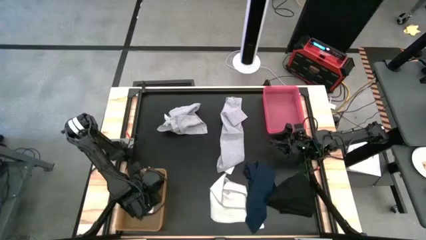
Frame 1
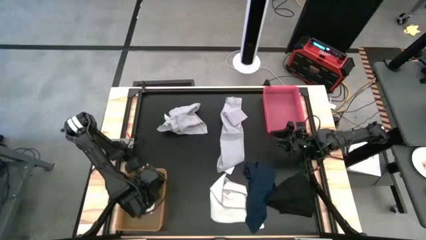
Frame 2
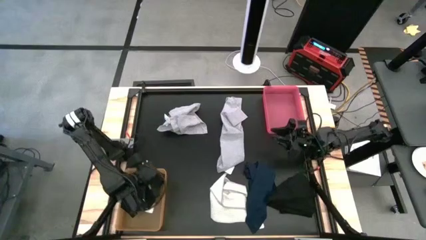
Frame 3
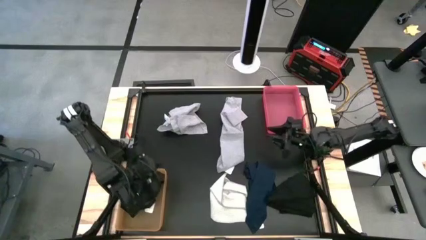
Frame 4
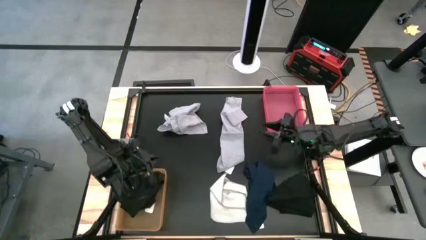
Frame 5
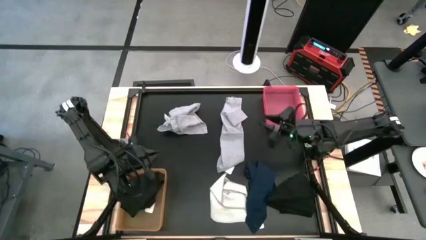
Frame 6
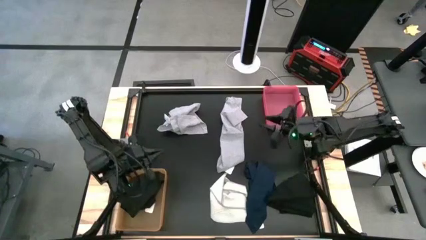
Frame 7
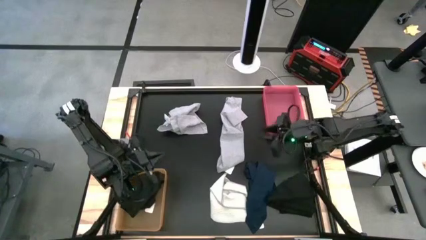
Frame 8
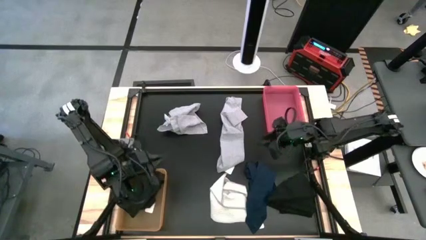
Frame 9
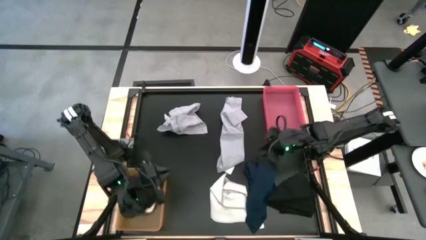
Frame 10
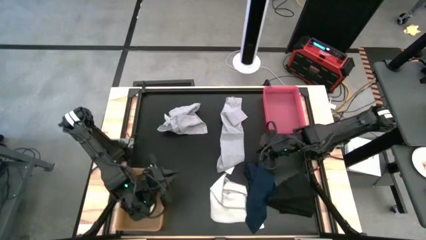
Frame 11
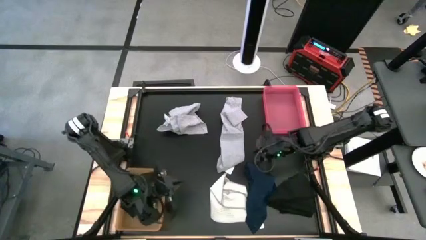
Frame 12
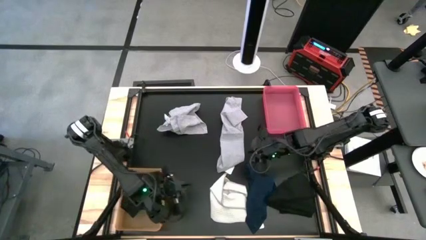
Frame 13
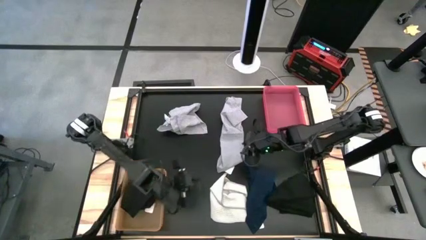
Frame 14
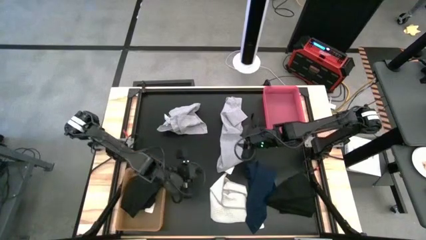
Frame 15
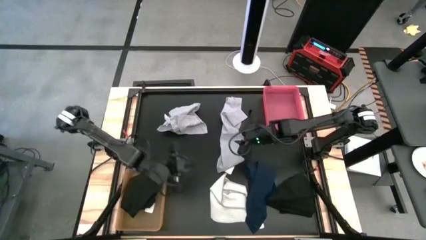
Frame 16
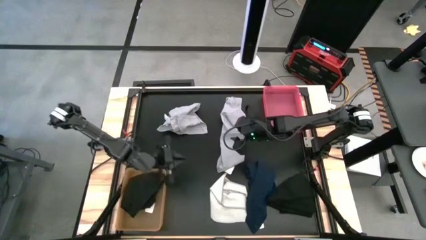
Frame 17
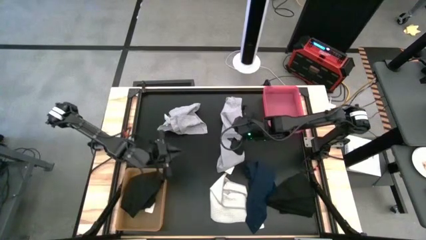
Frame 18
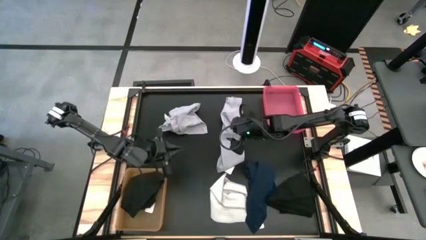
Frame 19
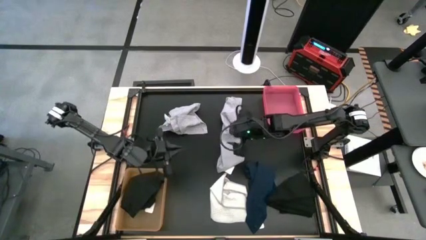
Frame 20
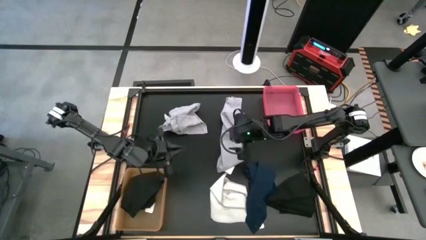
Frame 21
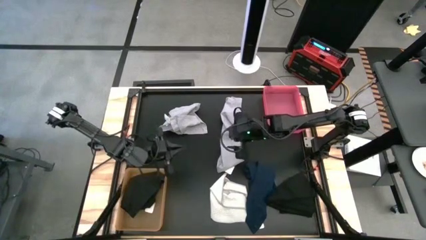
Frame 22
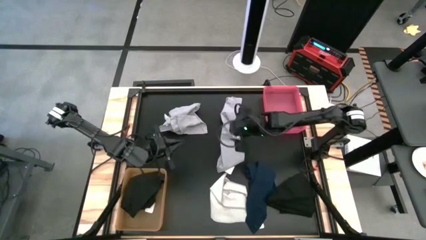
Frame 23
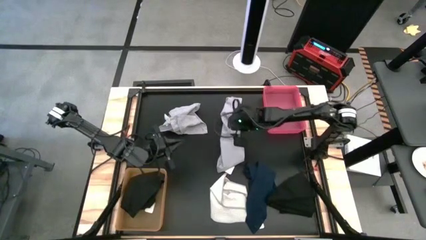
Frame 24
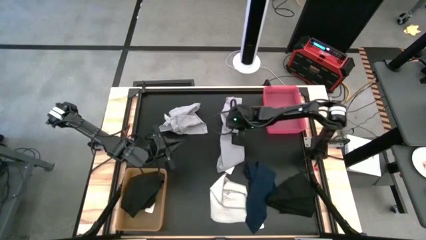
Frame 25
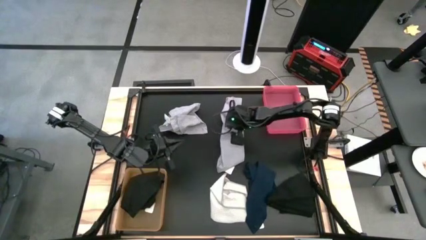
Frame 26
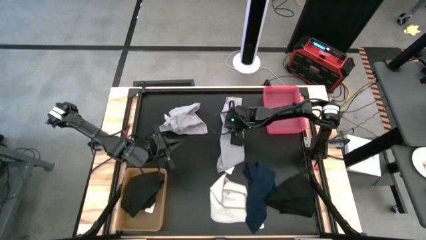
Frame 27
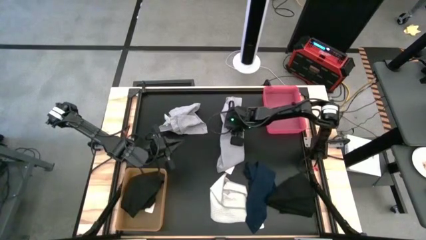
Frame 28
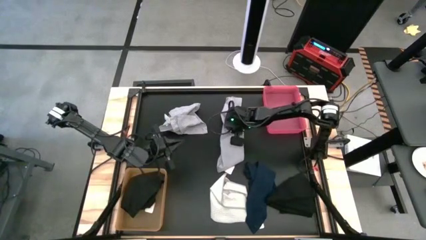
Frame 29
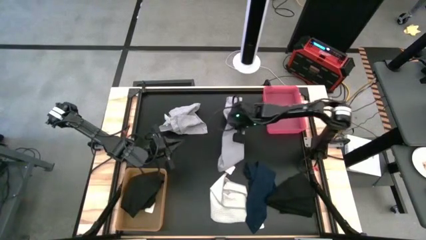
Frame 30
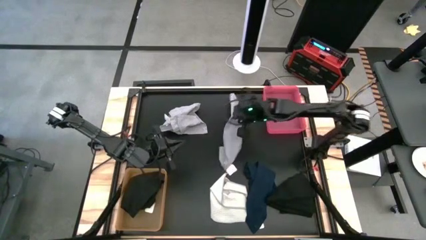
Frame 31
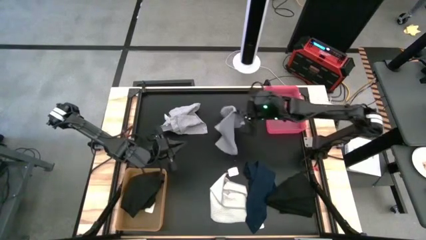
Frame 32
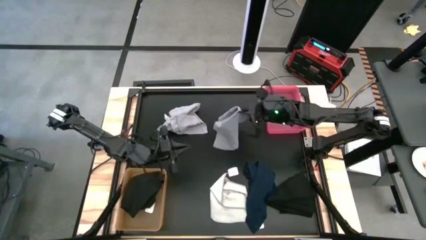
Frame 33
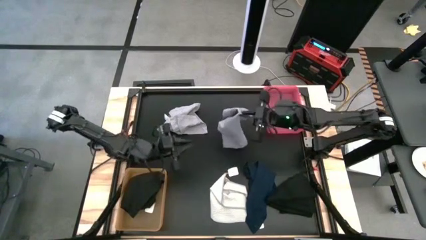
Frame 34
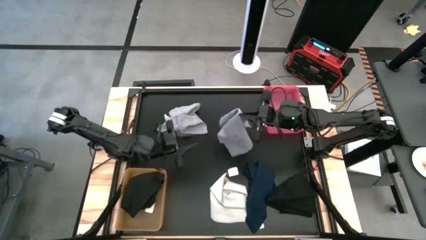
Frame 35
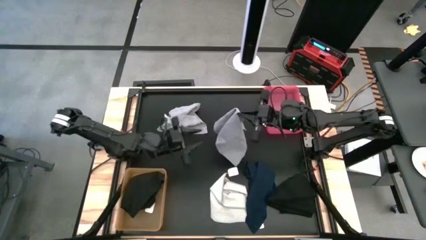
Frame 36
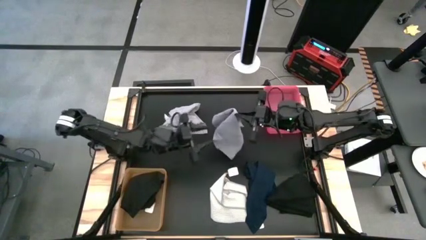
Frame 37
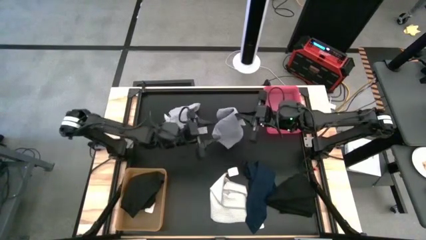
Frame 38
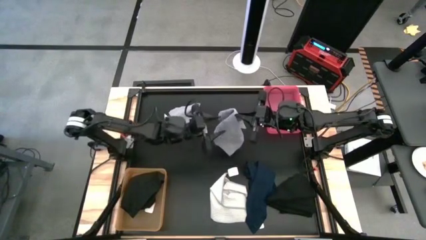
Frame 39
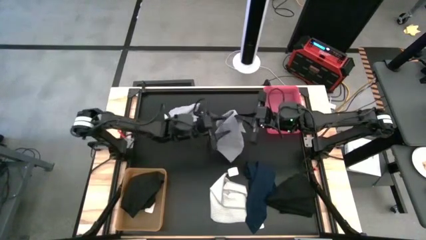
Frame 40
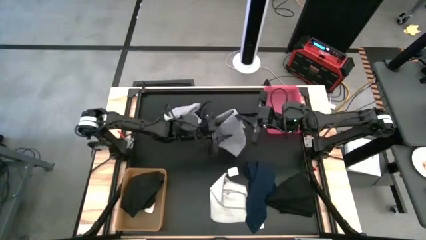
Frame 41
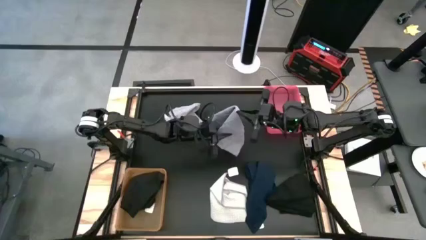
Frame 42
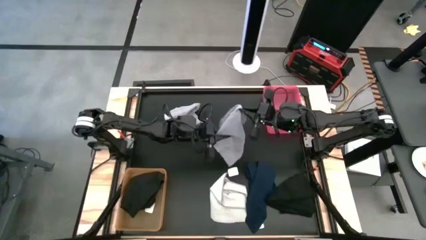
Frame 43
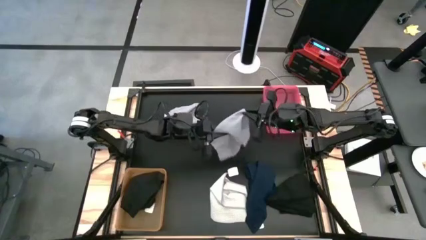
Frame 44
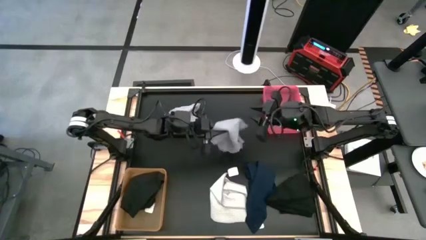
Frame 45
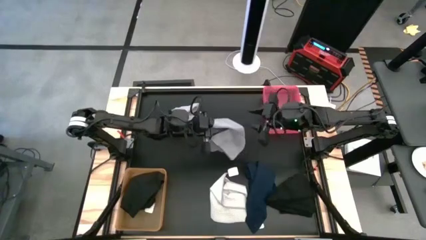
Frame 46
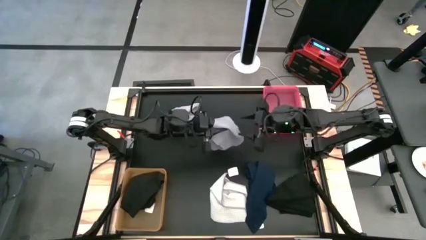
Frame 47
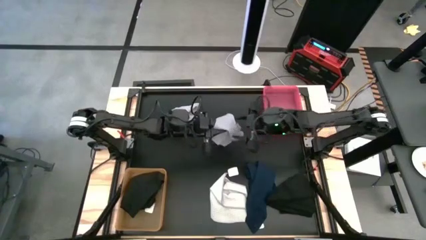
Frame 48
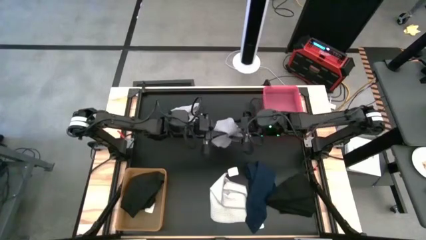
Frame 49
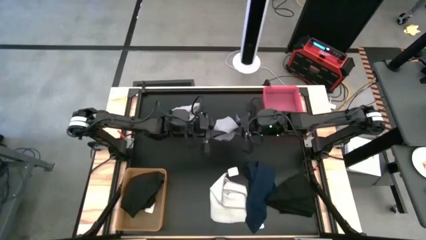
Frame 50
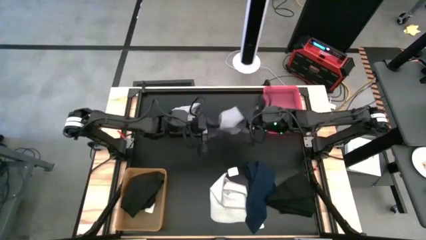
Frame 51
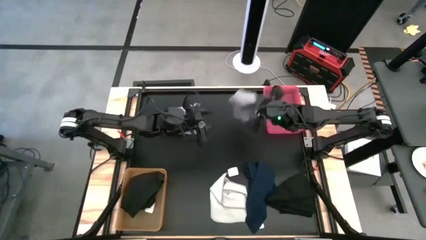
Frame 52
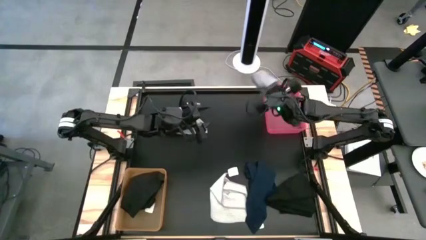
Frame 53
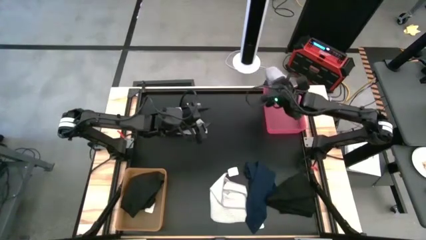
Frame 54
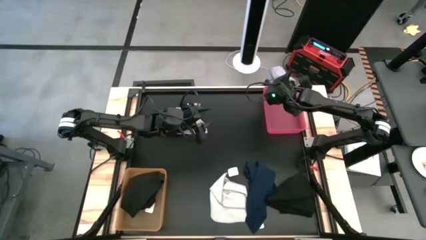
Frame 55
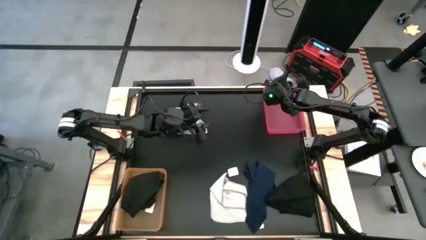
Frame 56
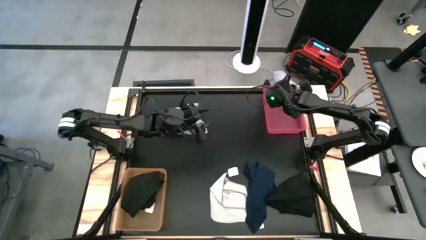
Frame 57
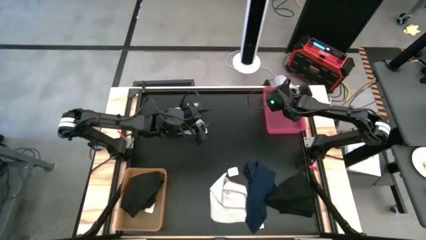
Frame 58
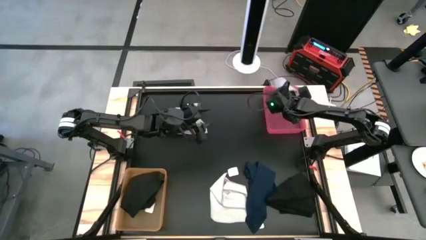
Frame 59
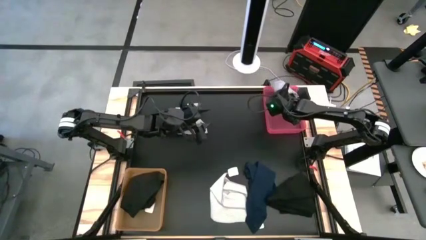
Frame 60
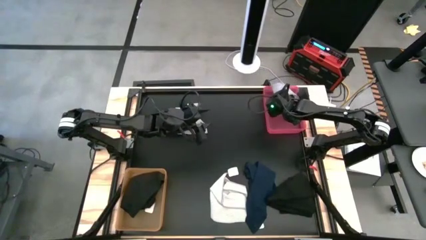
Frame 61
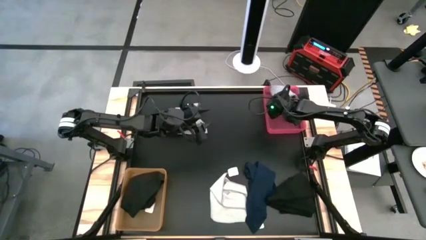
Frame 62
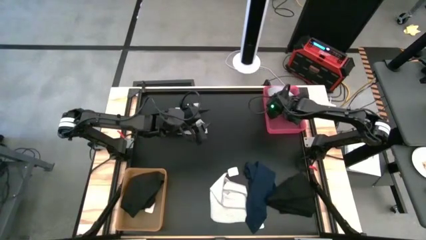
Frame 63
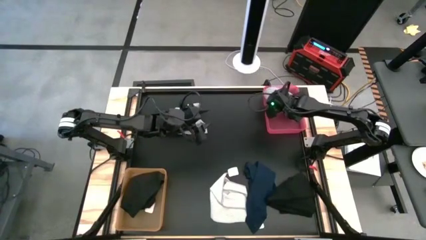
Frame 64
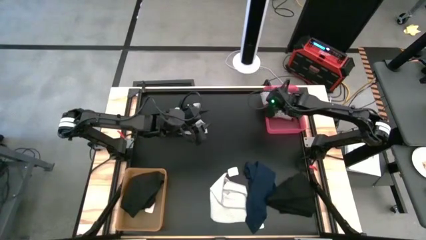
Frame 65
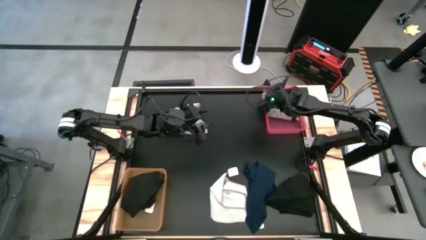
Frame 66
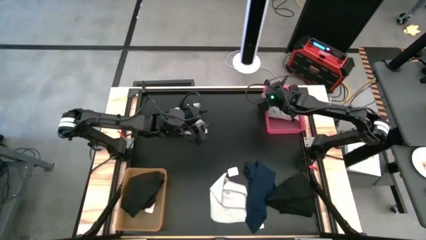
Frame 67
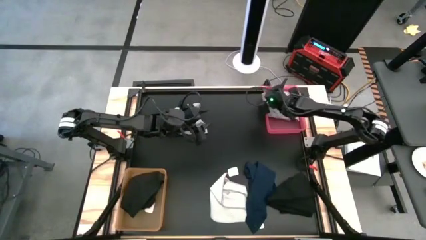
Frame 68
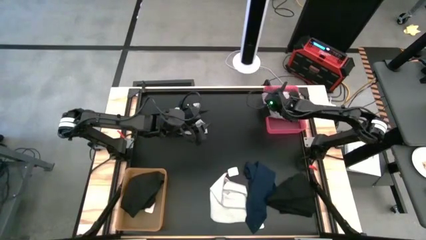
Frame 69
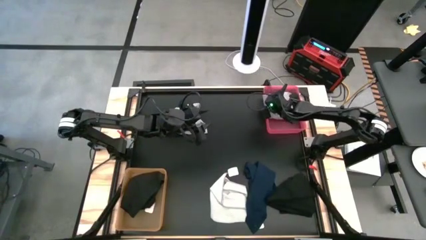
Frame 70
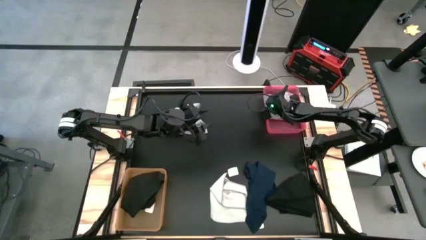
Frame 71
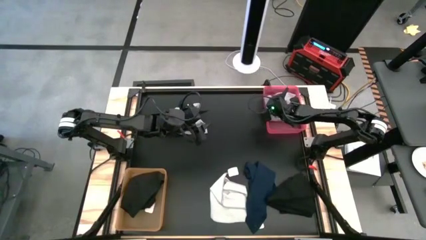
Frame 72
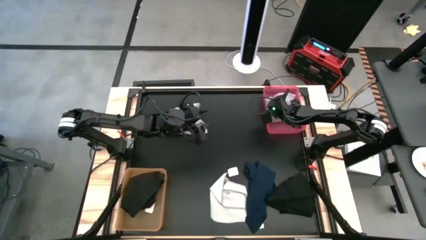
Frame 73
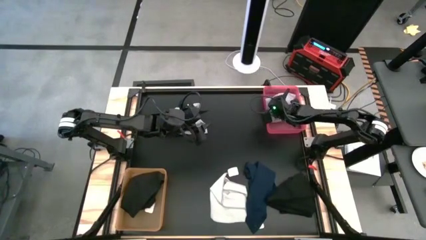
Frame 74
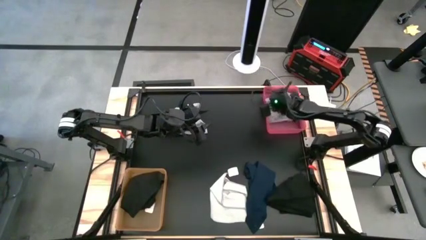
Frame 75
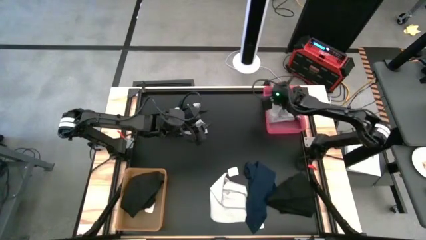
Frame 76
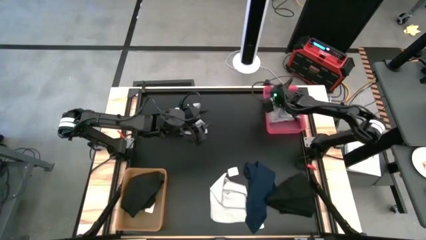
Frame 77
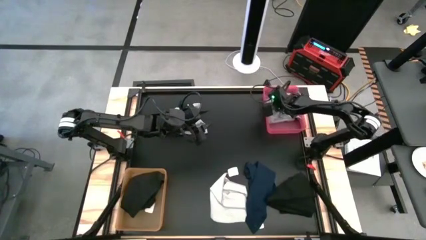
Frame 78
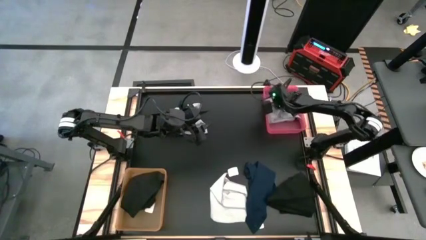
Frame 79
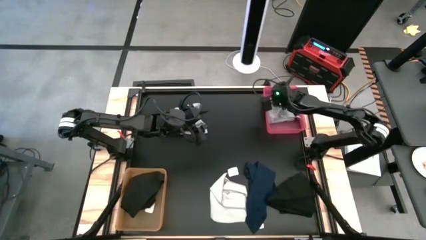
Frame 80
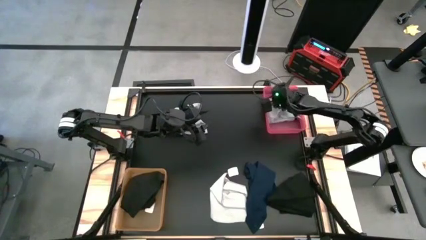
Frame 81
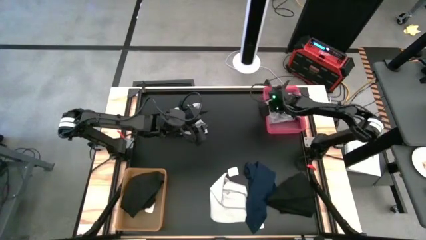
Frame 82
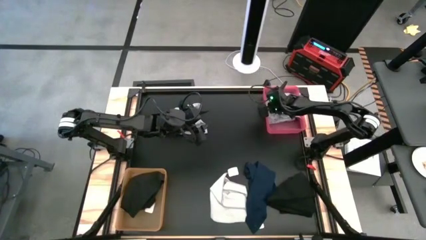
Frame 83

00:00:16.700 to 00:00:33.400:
Task: Sort towels by color in basket
Put the right gray microfiber towel into the pink bin
